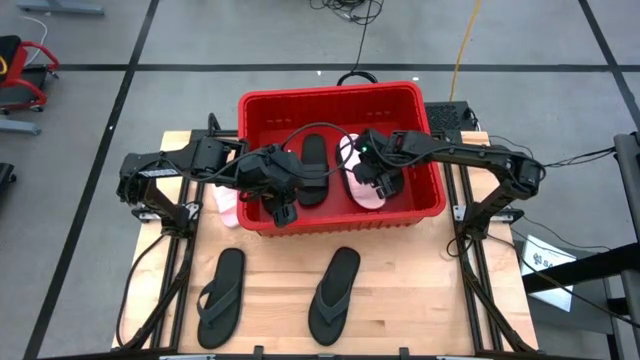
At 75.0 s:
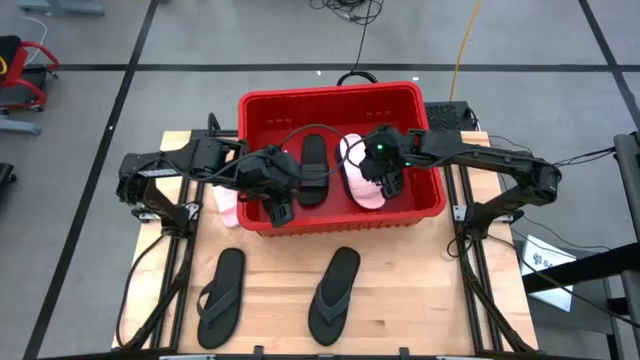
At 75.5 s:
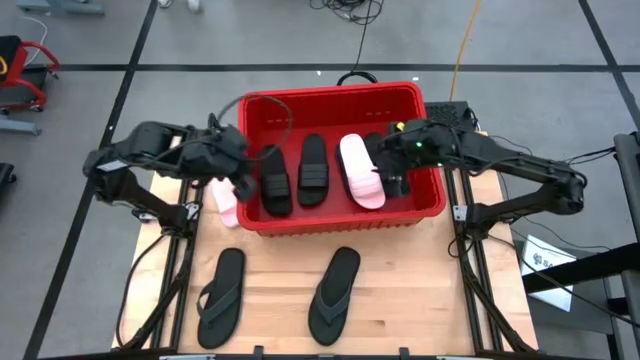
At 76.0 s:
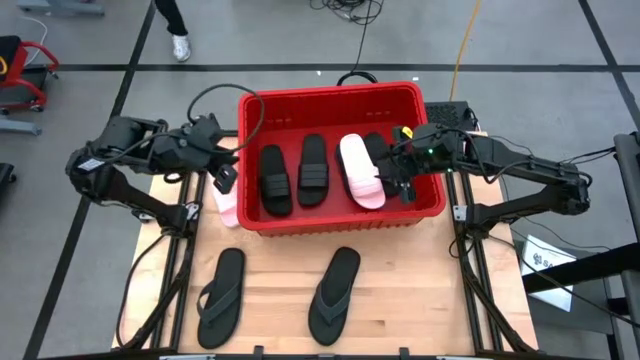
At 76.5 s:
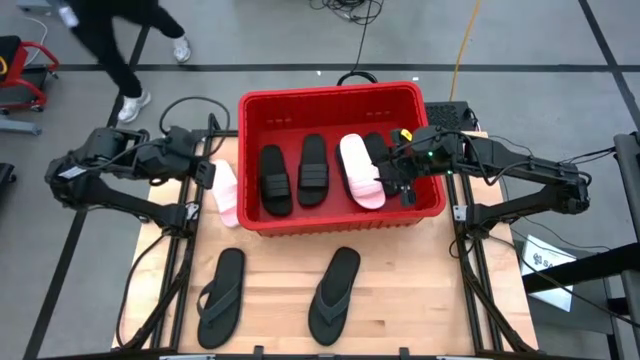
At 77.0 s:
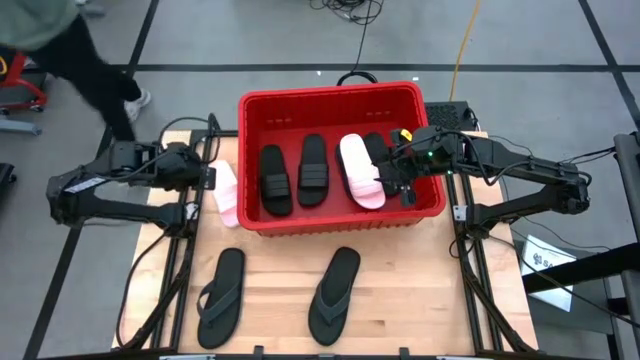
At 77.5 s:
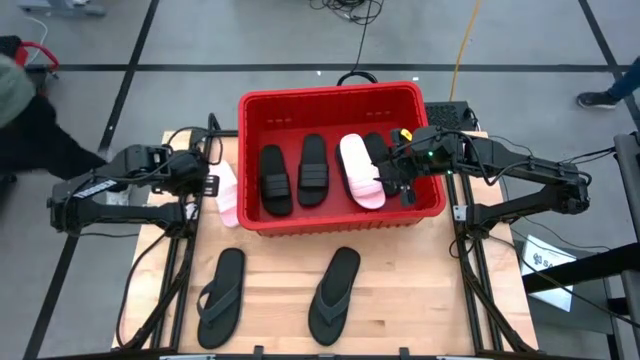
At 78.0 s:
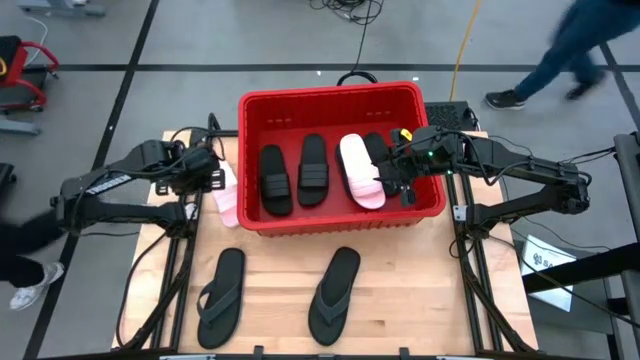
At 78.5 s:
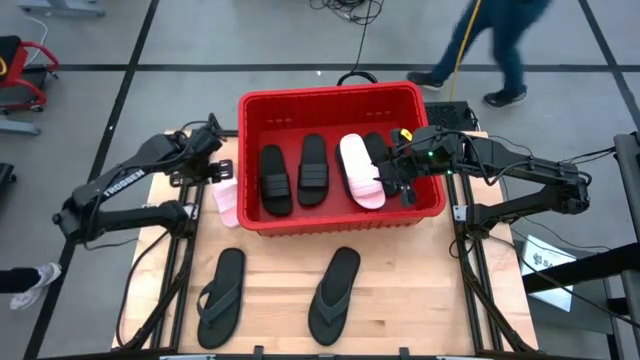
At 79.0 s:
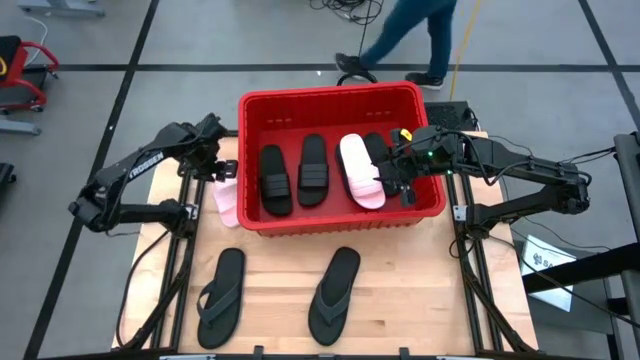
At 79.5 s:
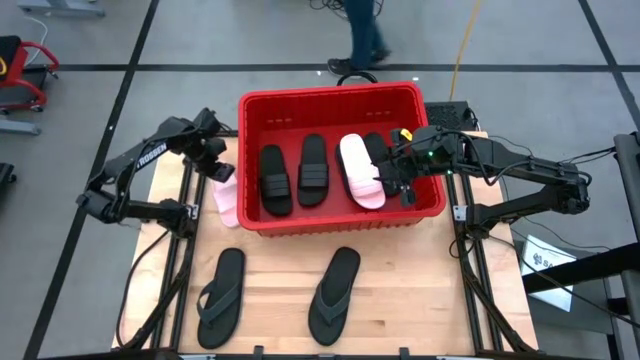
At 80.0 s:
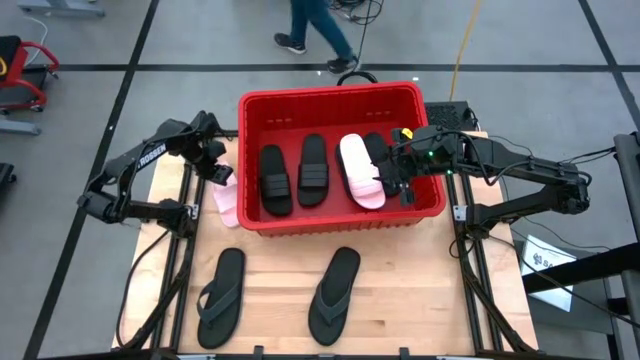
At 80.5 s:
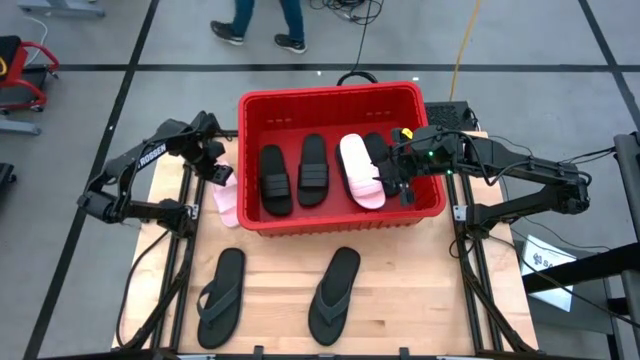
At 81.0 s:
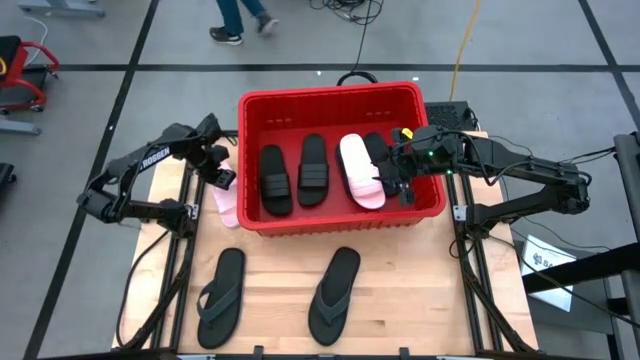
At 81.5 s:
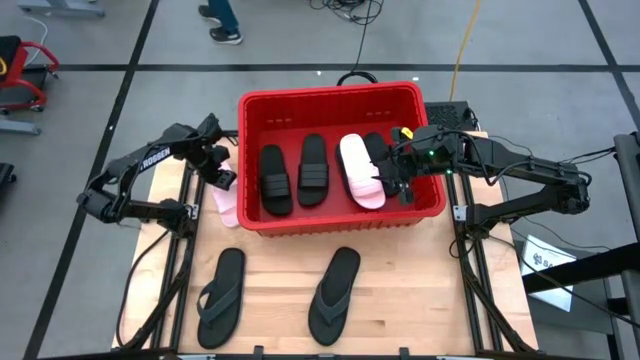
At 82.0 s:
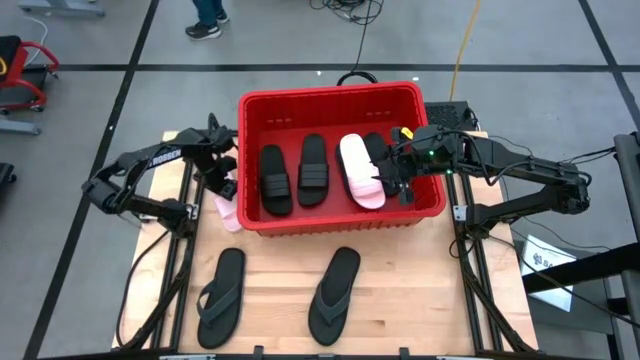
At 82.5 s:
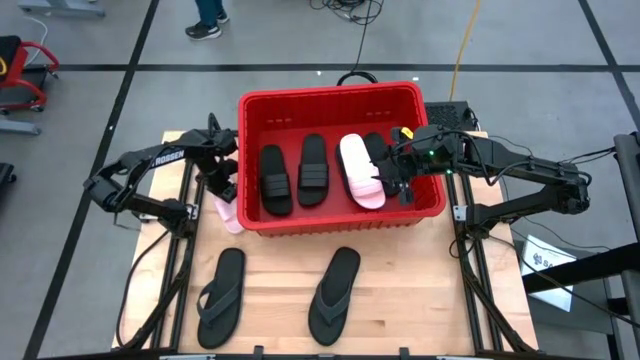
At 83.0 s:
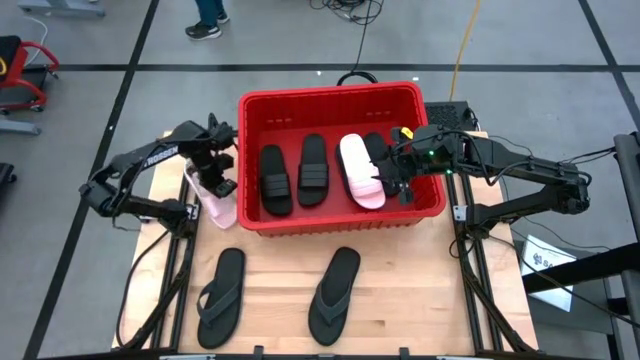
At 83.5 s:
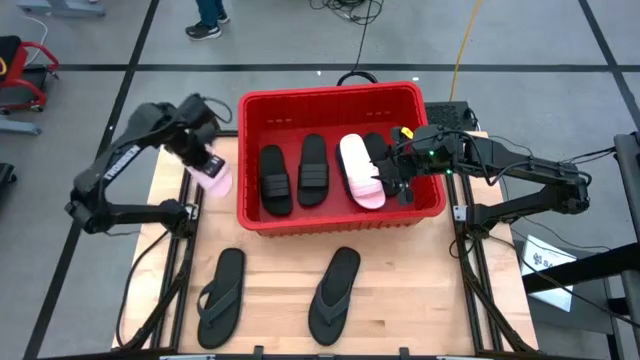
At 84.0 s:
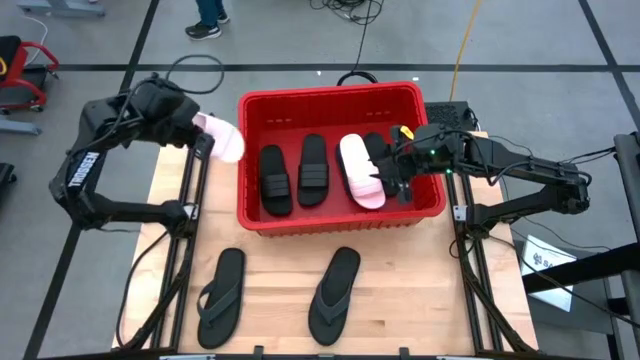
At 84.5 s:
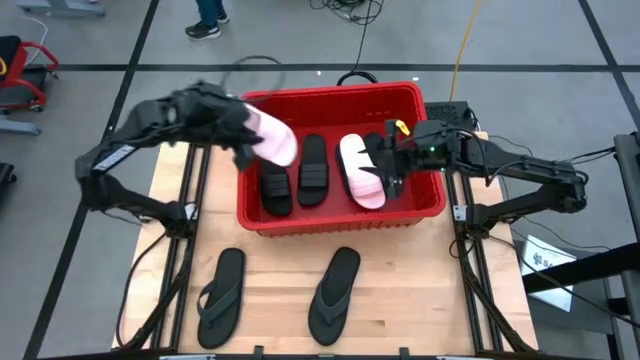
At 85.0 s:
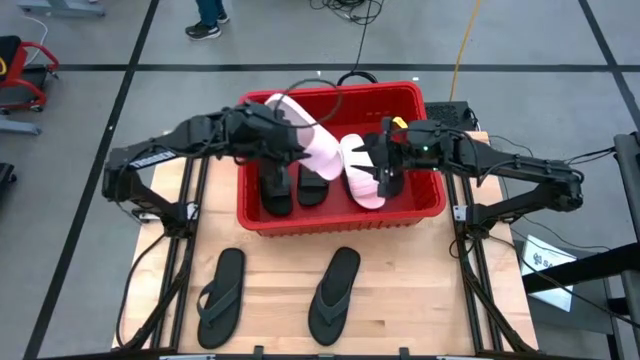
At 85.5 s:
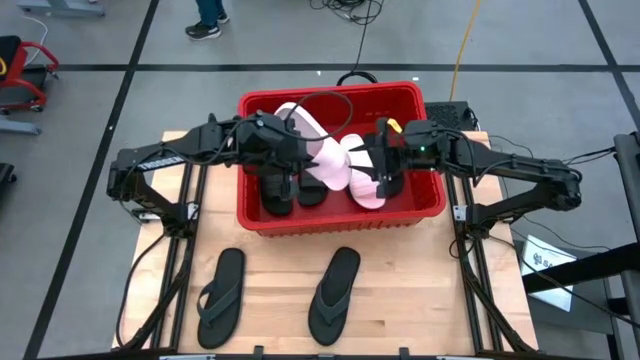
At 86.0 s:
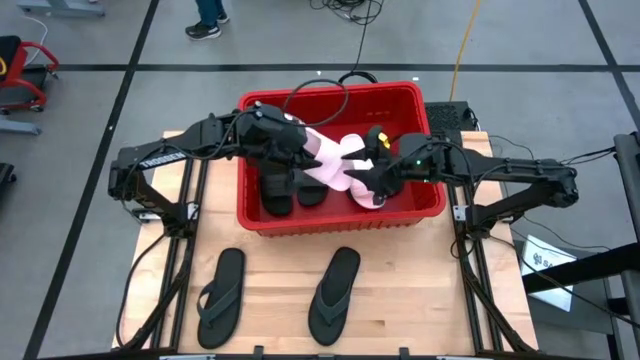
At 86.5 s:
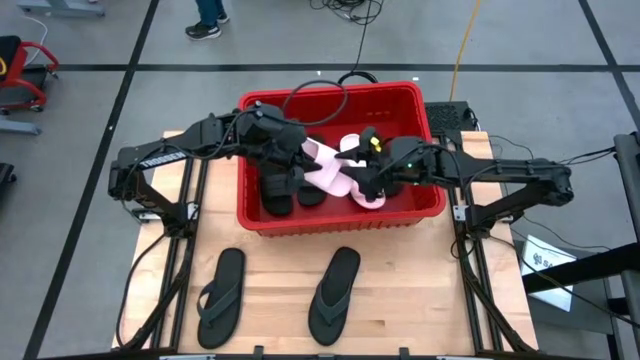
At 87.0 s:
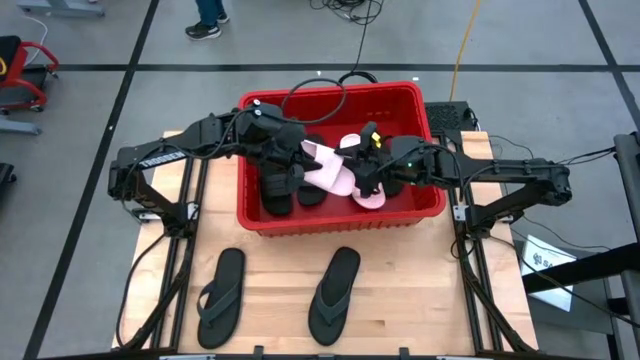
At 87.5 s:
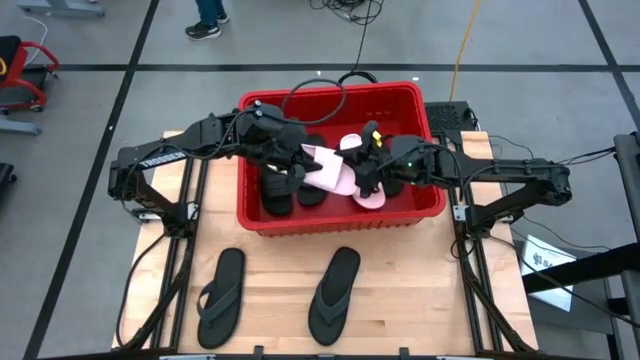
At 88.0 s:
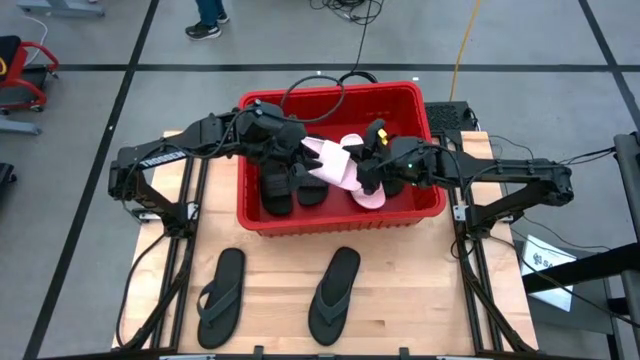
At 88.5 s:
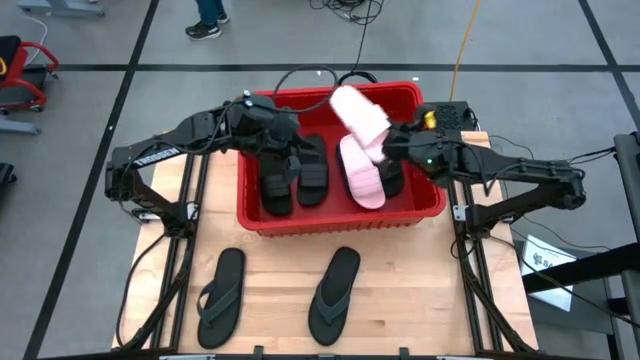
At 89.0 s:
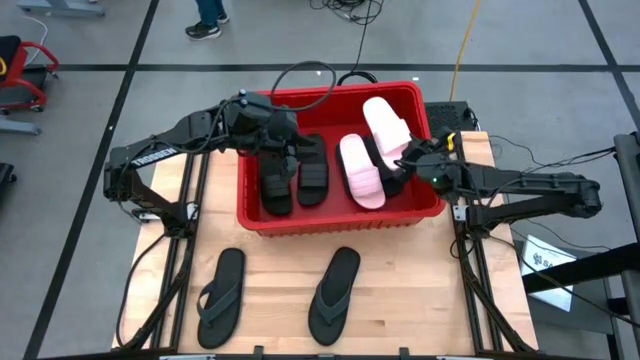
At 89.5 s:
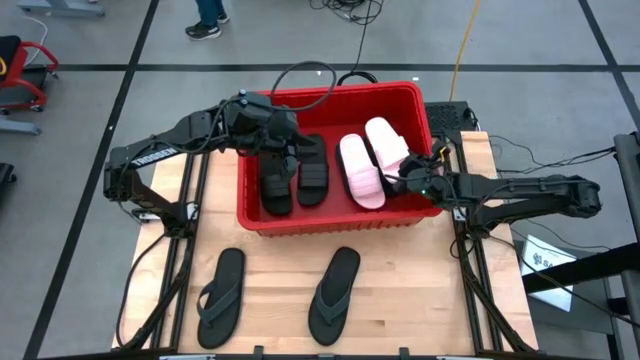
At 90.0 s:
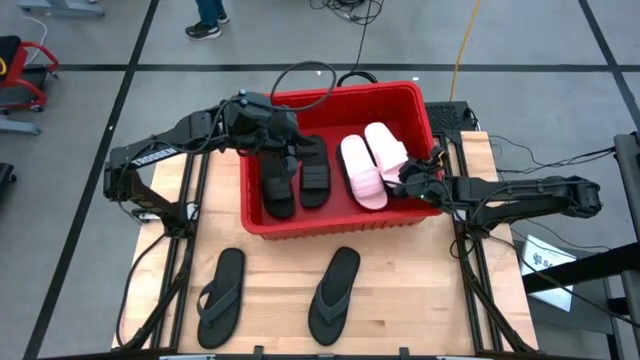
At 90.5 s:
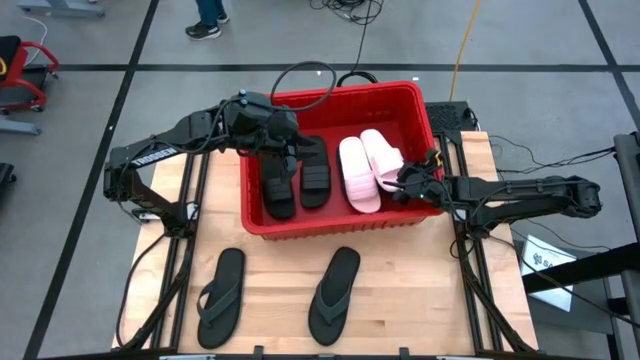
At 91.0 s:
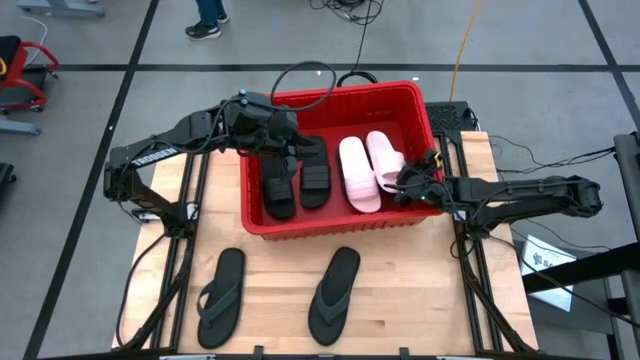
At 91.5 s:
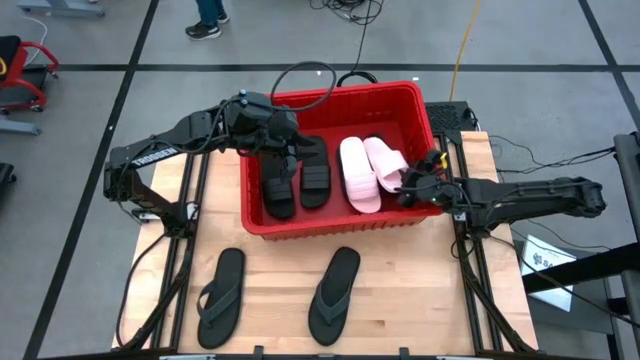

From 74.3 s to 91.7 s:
Task: Pick and place slides into bin
Put the pink slipper into the red organizer bin

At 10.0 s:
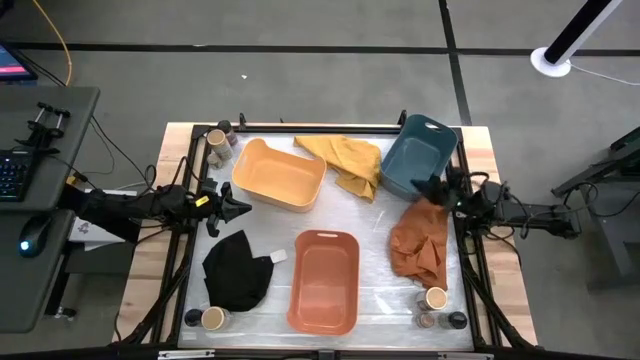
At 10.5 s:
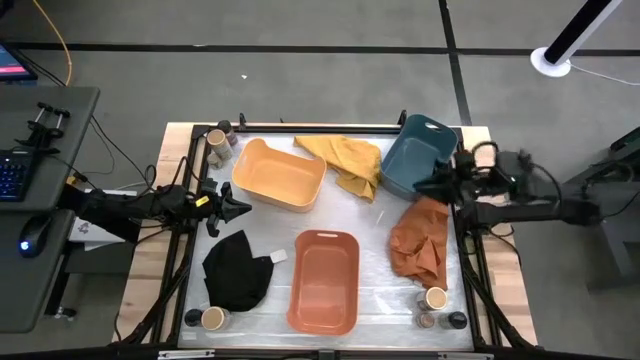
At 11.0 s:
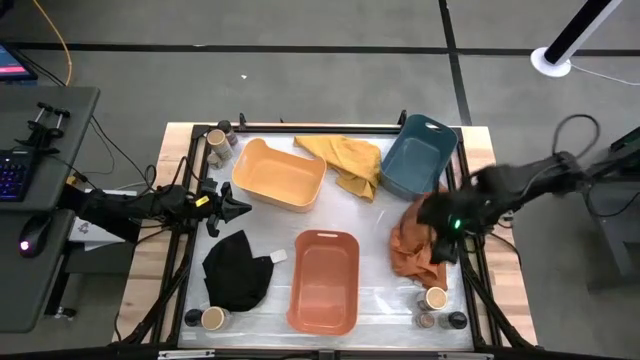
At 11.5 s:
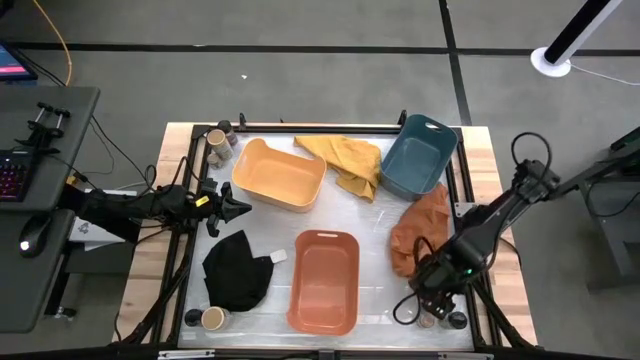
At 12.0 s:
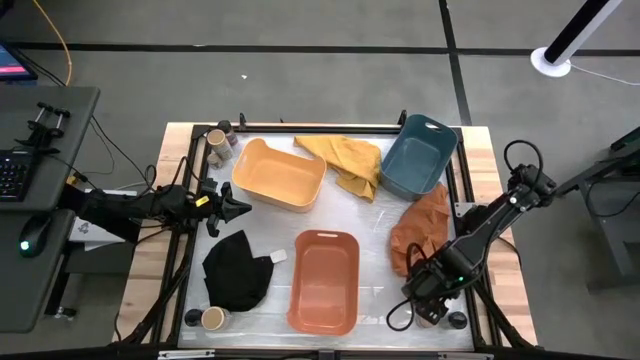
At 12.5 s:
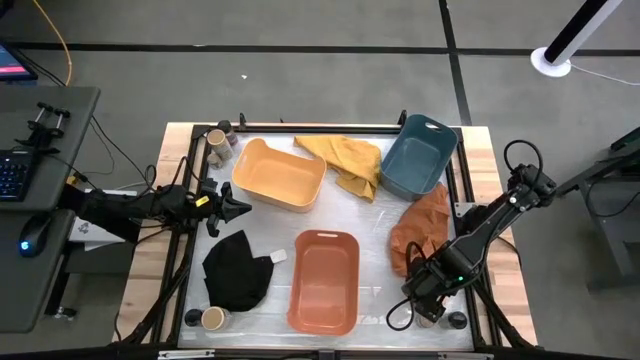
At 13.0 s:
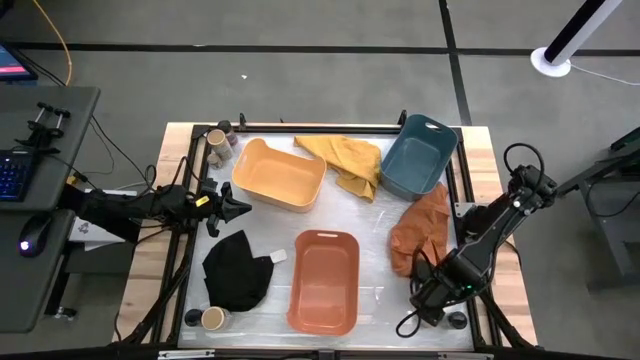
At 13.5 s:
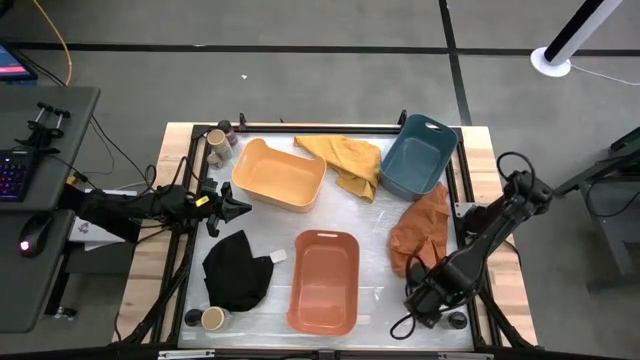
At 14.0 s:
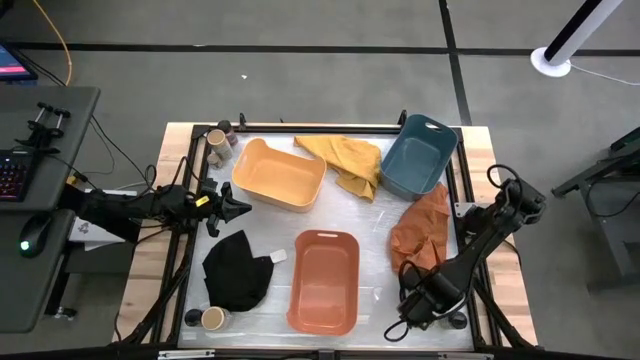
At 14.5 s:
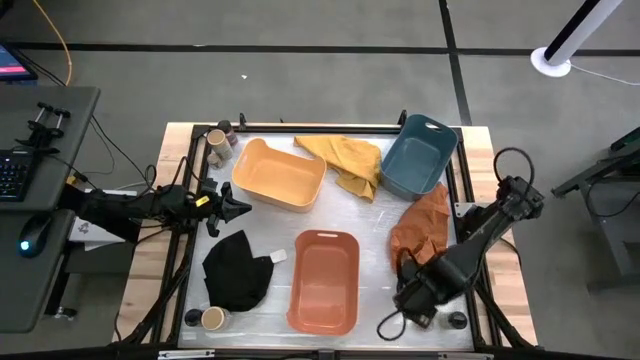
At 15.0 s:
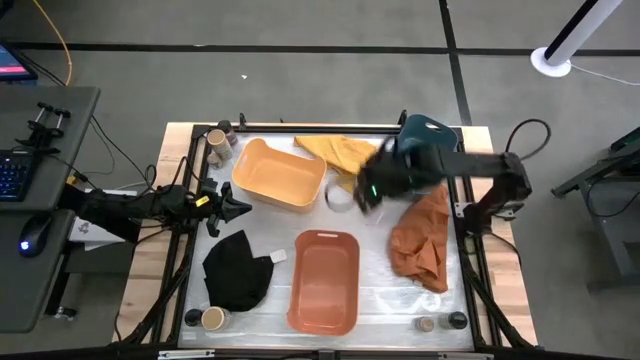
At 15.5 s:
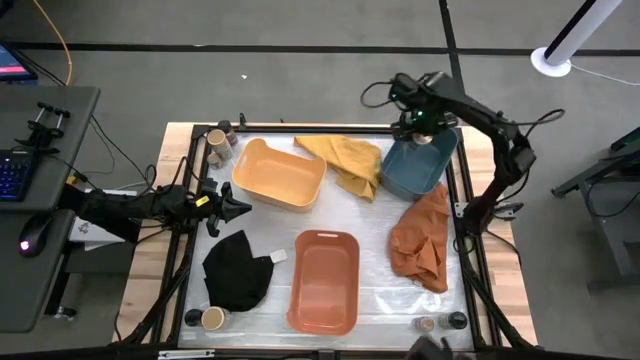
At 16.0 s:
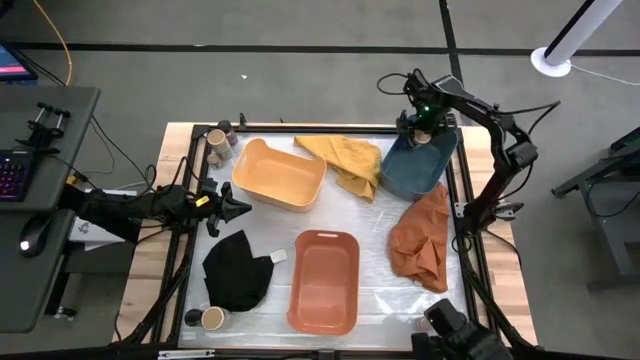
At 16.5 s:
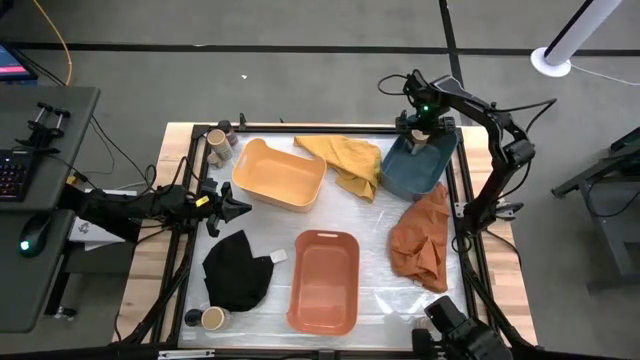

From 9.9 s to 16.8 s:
Task: Sort spices by type
Put the bottom right gold seasoning bottle into the blue bin
